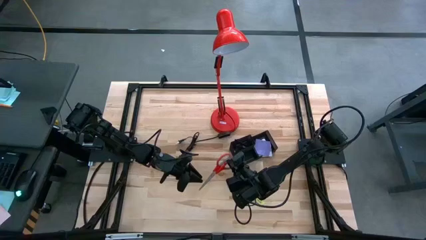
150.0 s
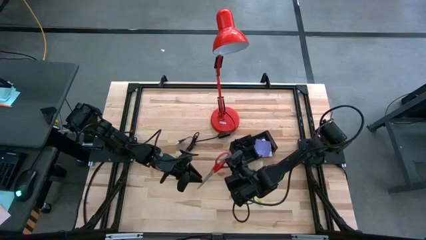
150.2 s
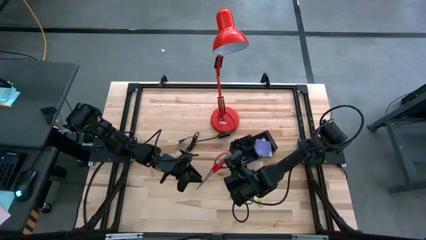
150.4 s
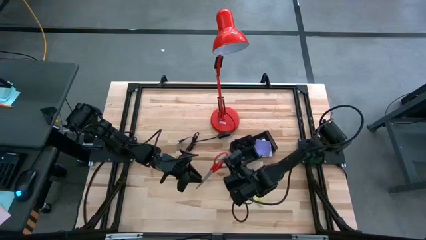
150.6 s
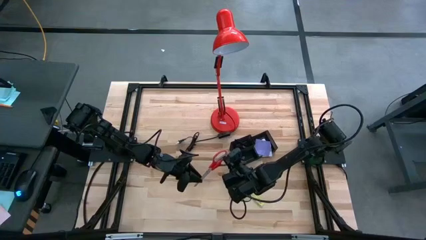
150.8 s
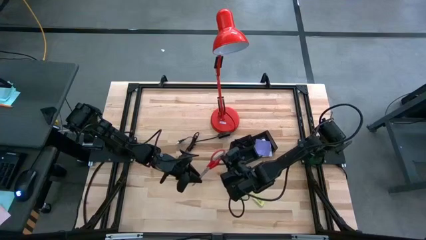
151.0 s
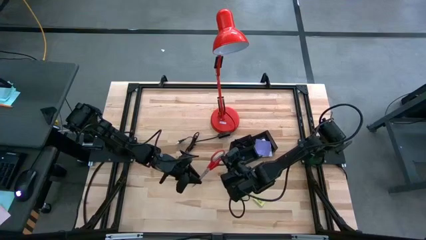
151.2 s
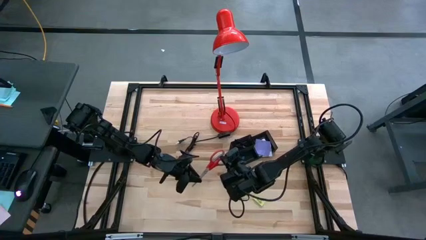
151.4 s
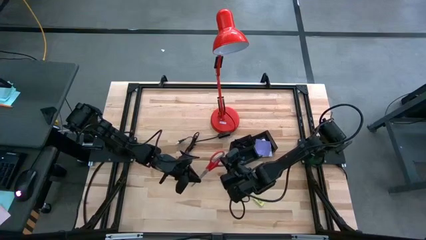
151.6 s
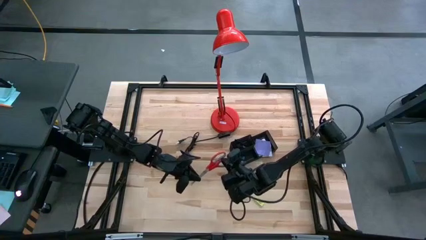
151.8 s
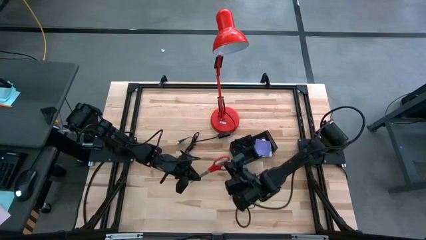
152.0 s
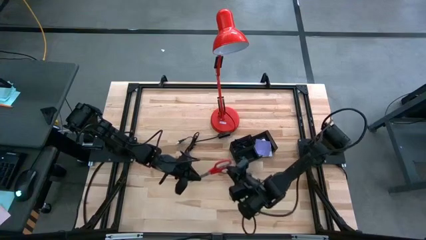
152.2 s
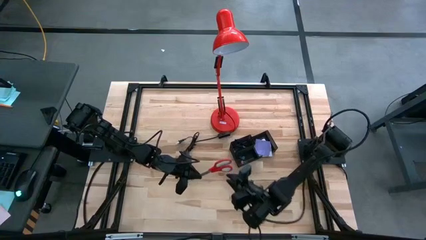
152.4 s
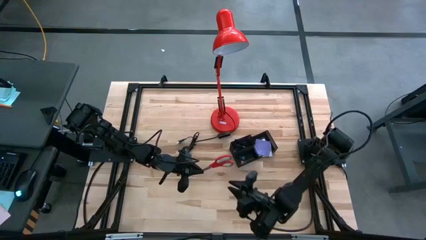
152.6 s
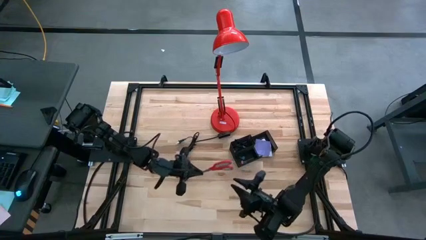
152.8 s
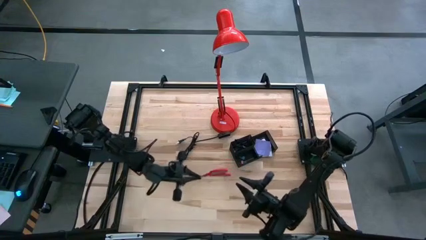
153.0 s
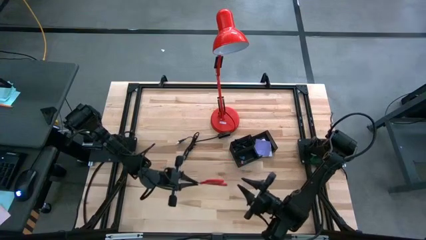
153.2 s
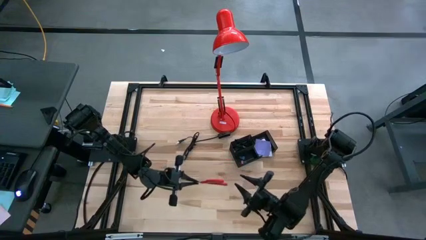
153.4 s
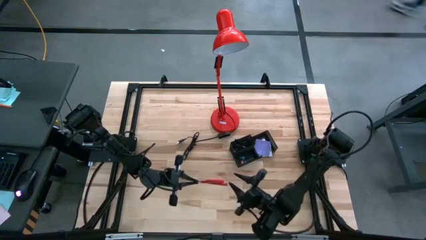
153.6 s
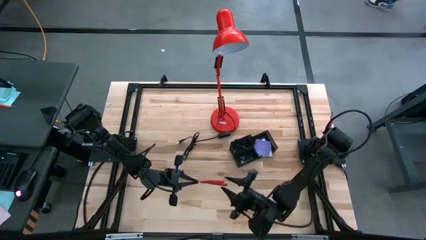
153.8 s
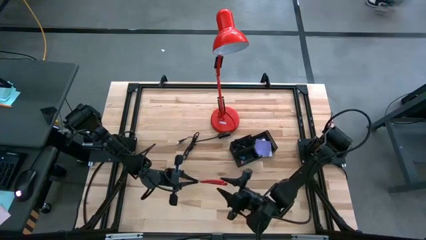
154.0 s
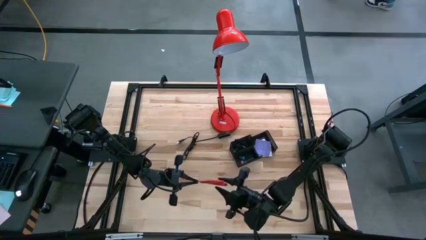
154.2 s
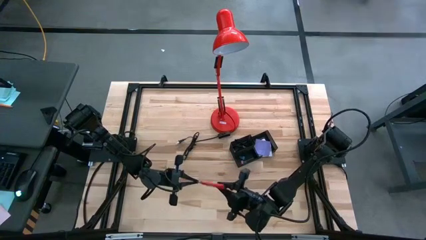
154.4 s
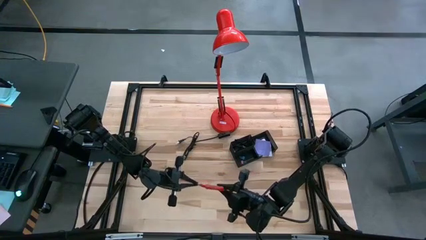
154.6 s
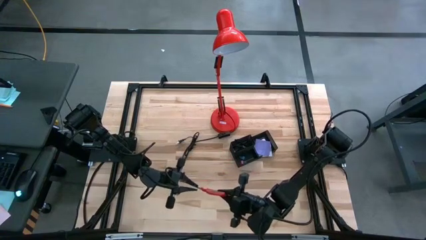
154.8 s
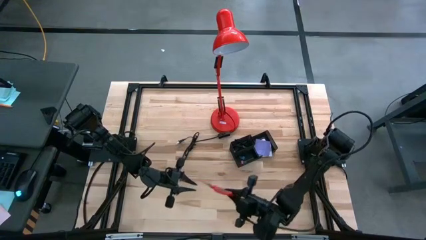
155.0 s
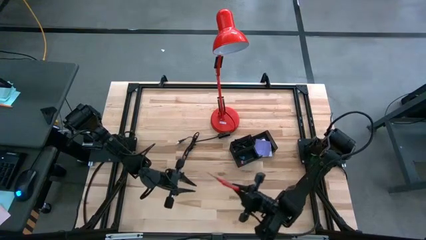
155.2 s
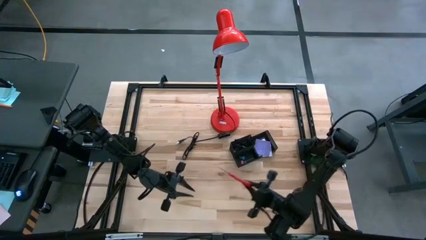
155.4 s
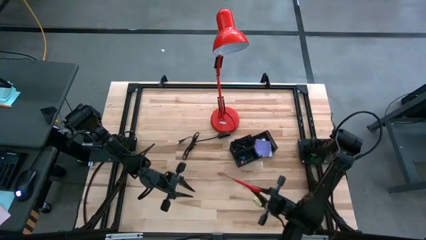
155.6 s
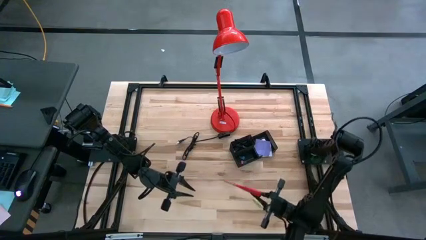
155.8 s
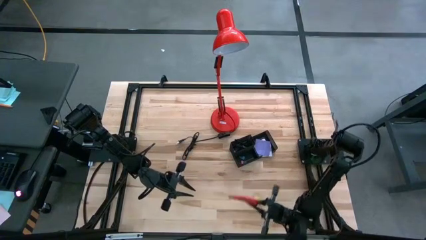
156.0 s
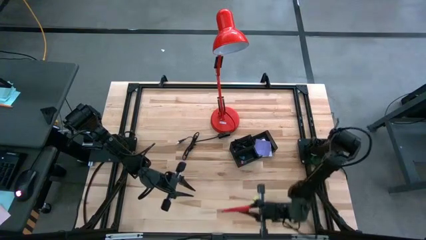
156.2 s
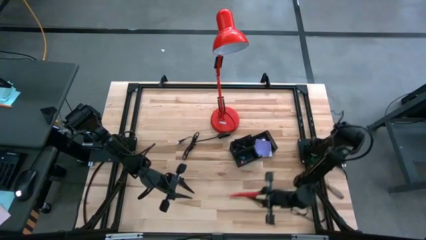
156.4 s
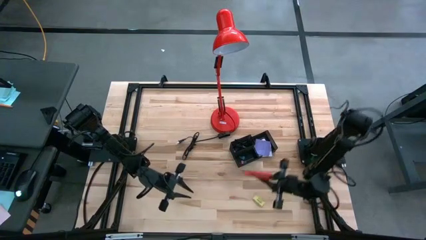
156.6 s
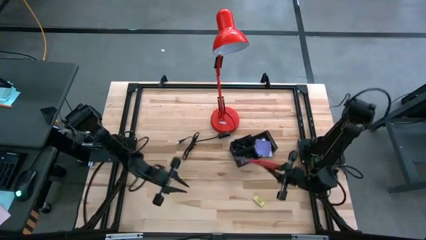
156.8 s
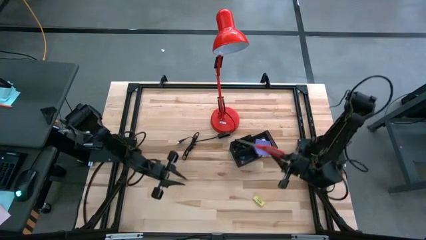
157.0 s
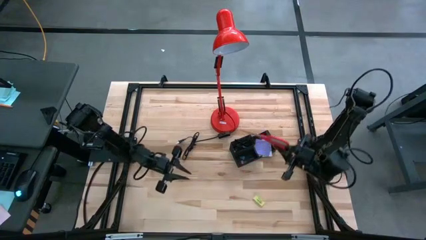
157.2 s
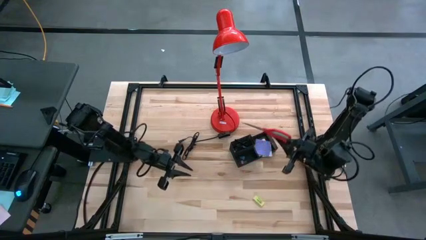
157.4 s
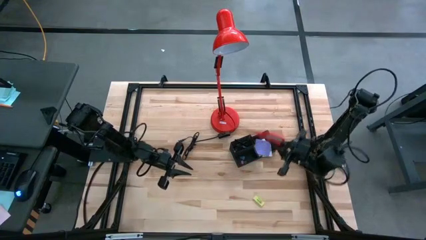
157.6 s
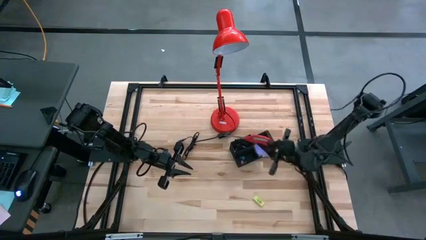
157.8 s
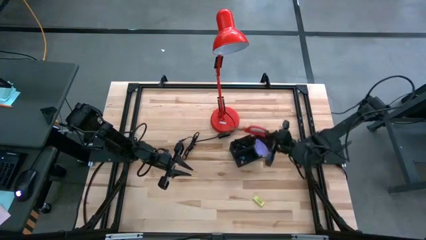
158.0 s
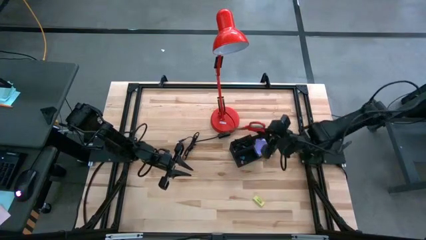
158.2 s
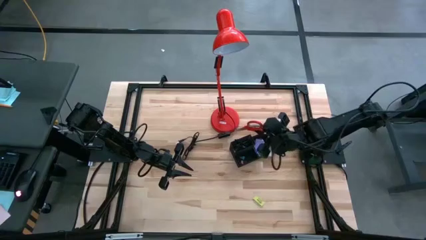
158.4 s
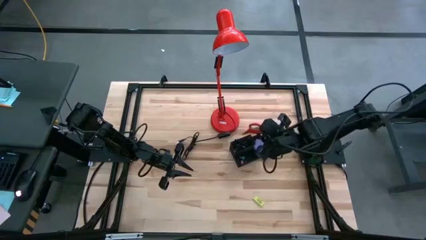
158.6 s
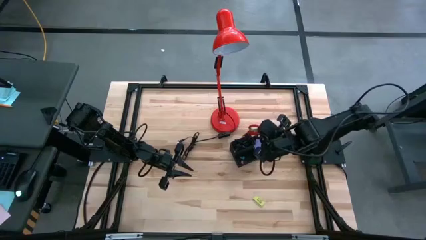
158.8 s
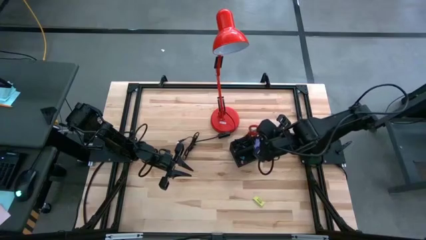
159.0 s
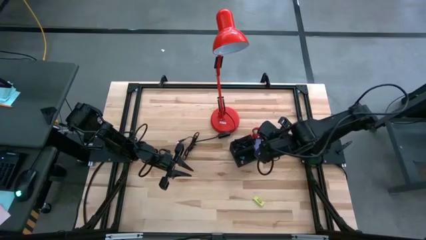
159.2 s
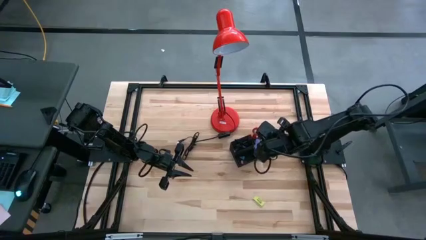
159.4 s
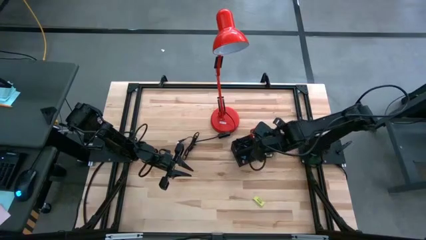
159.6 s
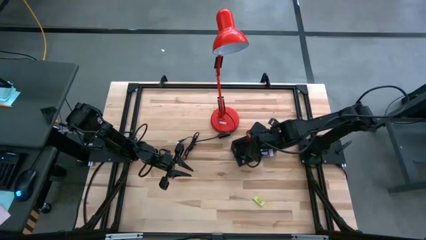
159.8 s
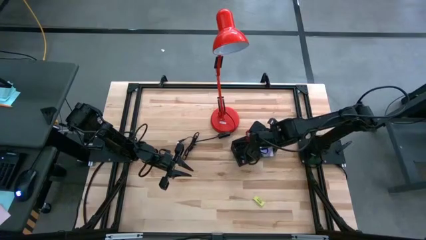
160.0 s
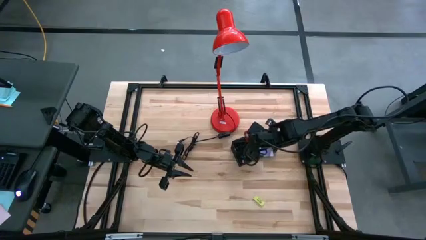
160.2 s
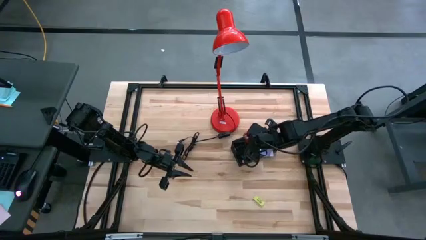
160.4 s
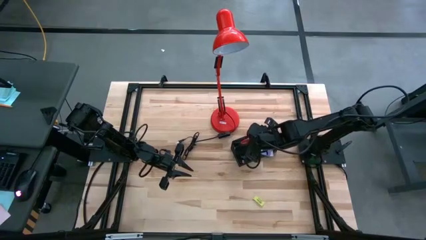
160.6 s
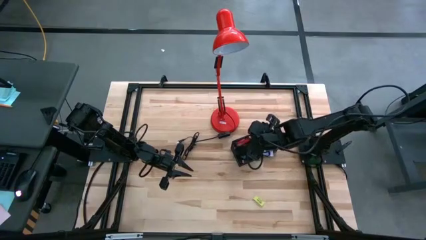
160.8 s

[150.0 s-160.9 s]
Task: Pick and place office supplies into organizer
Put the scissors into the desk organizer

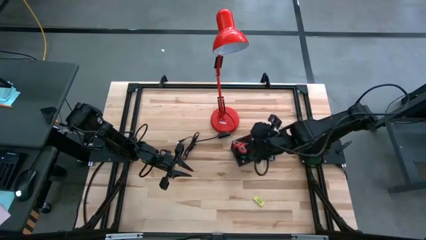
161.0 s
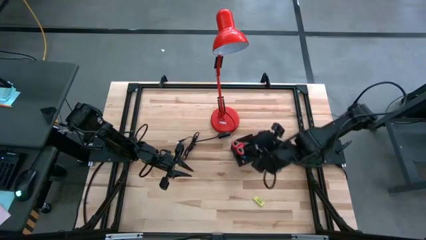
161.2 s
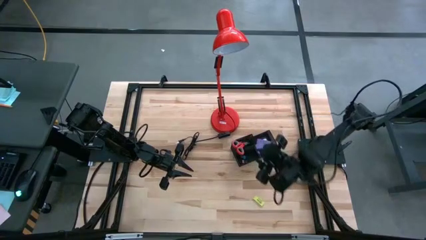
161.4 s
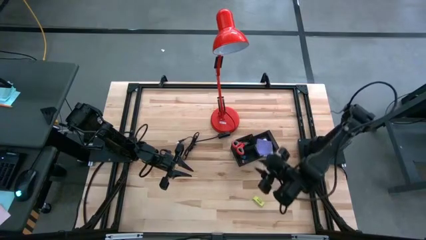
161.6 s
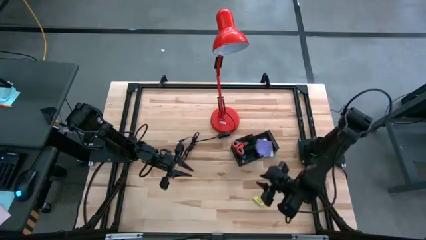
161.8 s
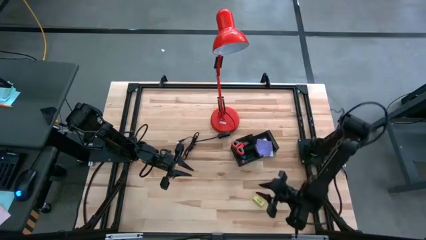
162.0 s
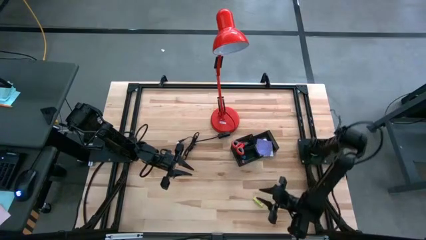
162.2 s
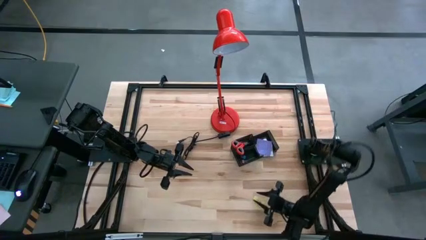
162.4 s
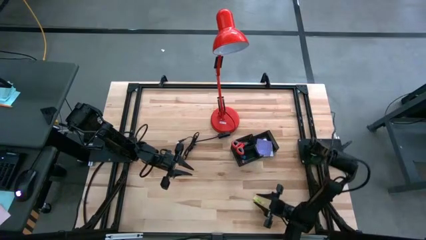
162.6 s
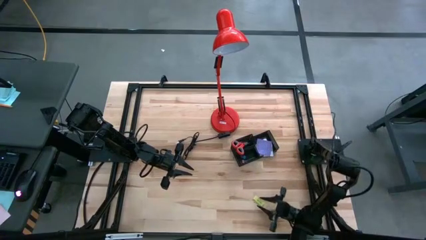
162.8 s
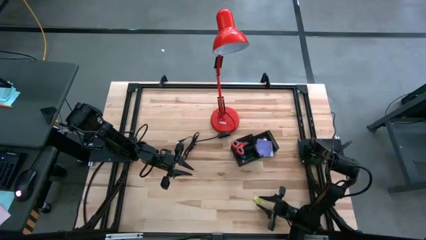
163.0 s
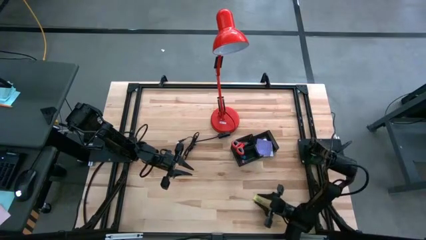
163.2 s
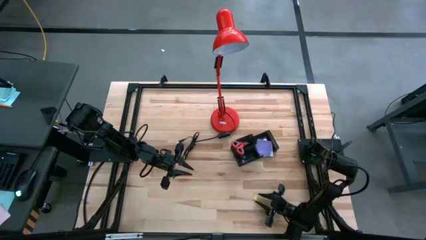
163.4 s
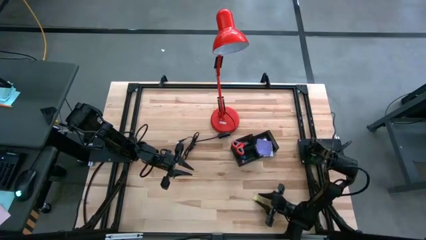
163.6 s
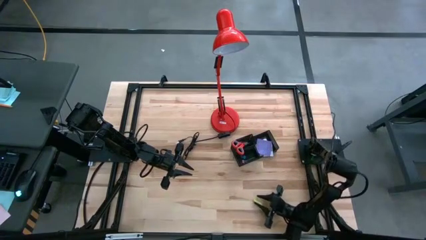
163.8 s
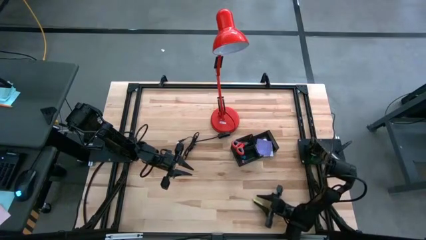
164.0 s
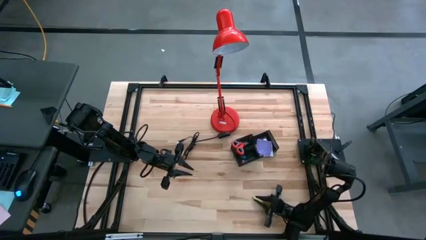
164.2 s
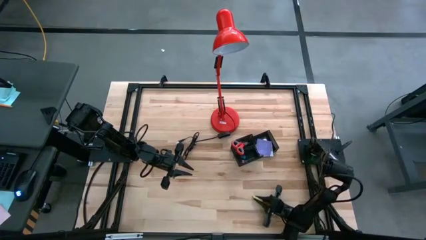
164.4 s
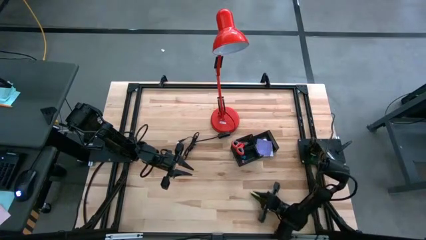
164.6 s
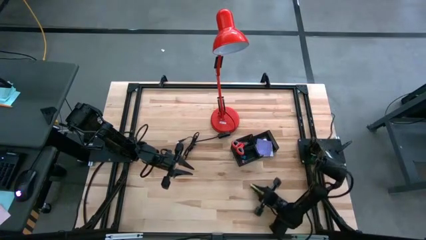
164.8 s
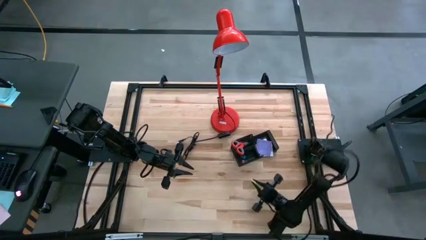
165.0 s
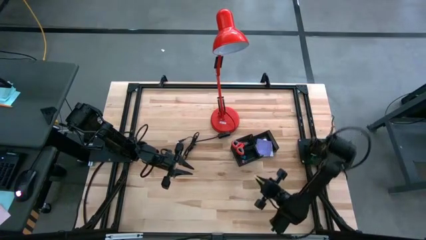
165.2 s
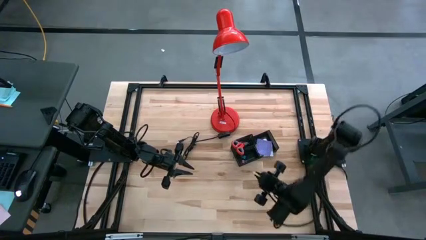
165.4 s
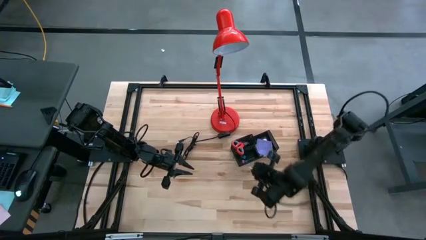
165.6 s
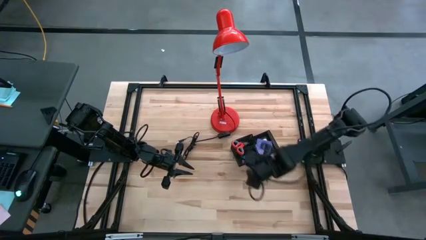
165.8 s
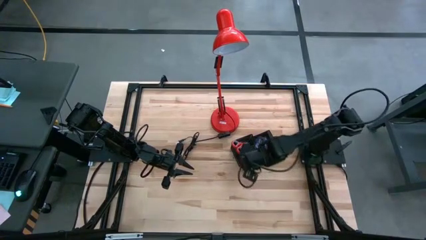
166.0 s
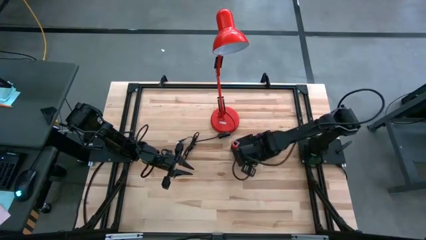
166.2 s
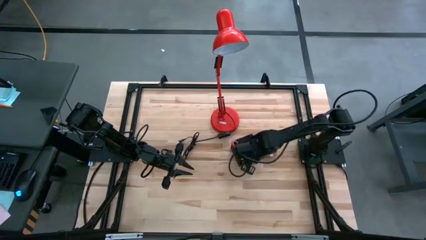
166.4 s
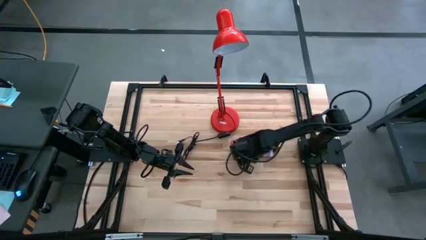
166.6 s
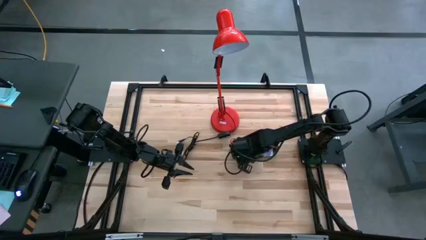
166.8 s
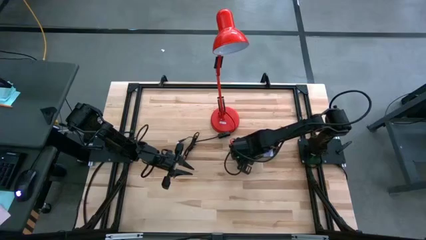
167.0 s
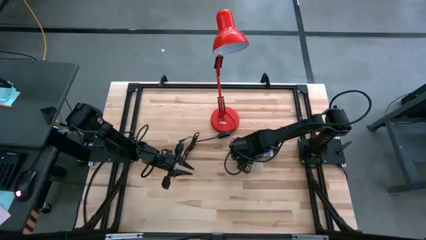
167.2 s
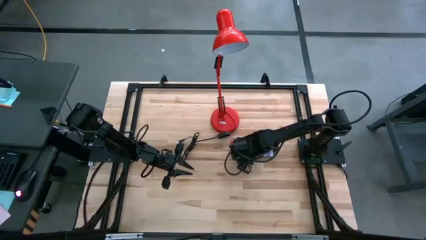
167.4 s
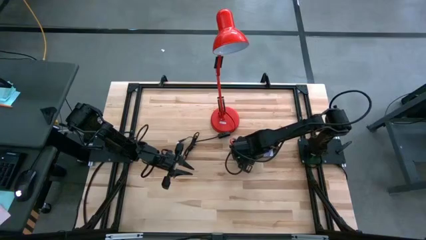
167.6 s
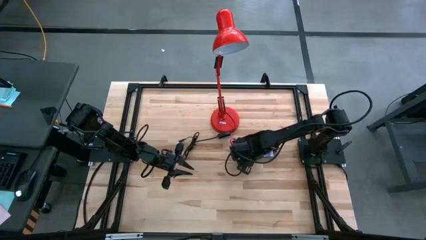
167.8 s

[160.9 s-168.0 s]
Put the green eraser into the desk organizer
